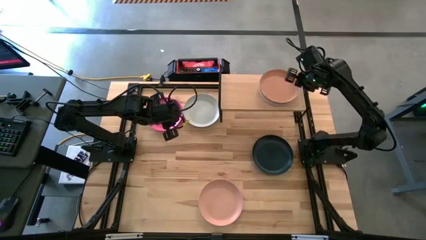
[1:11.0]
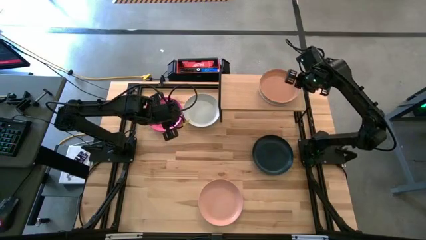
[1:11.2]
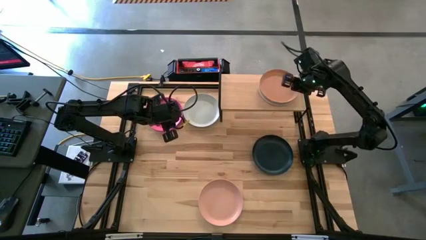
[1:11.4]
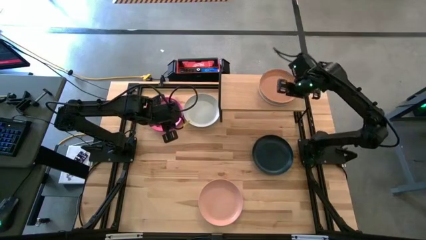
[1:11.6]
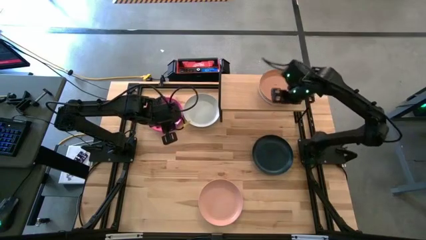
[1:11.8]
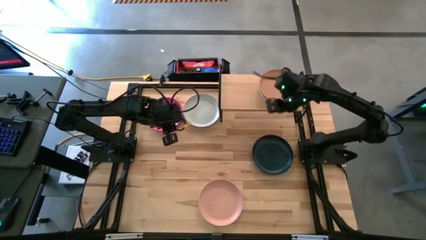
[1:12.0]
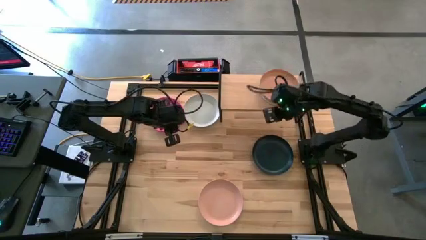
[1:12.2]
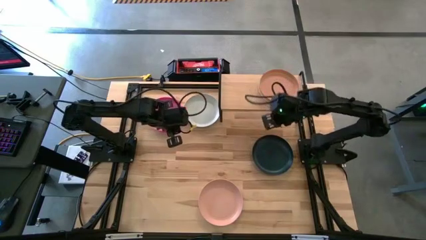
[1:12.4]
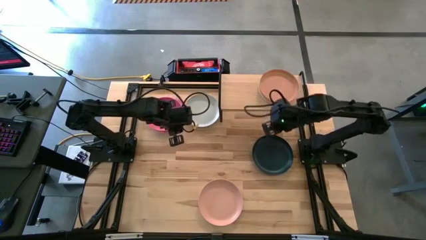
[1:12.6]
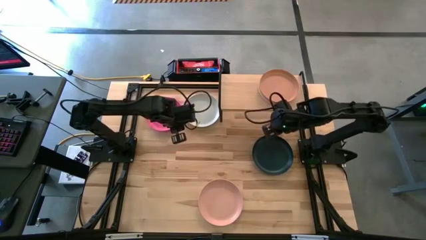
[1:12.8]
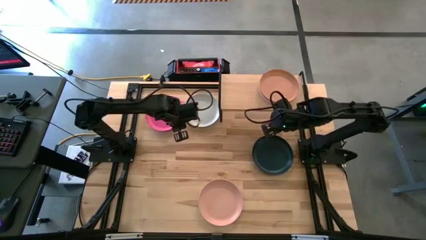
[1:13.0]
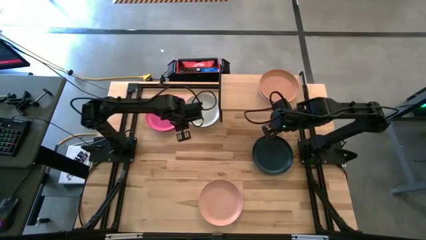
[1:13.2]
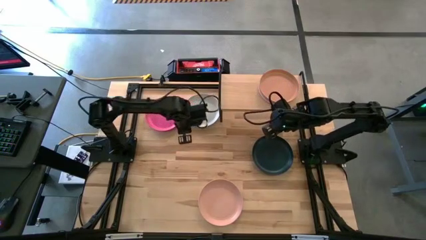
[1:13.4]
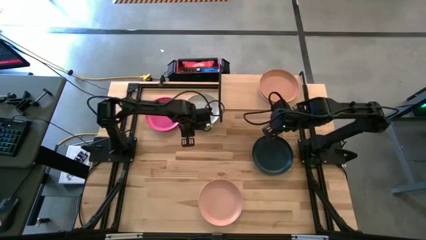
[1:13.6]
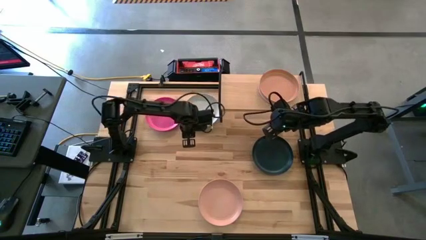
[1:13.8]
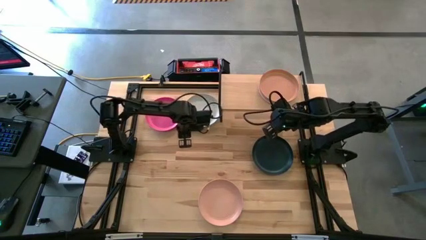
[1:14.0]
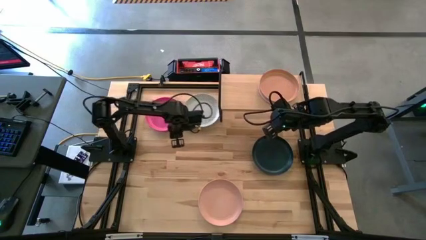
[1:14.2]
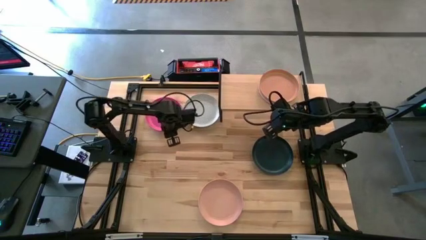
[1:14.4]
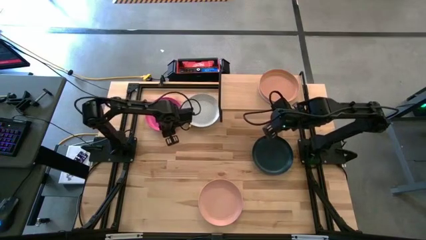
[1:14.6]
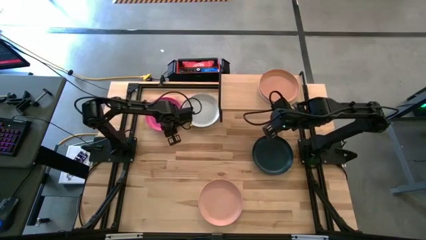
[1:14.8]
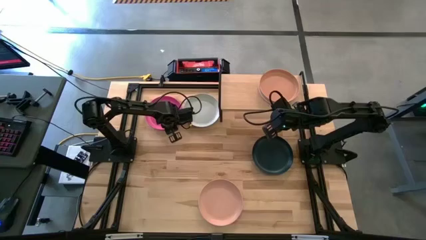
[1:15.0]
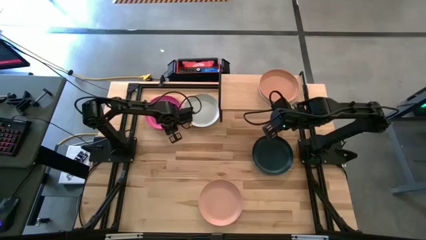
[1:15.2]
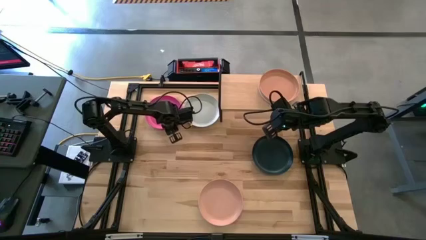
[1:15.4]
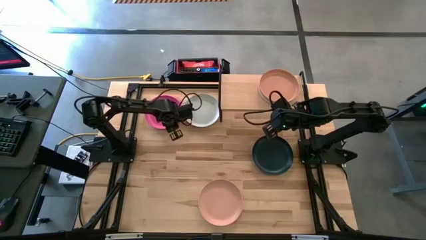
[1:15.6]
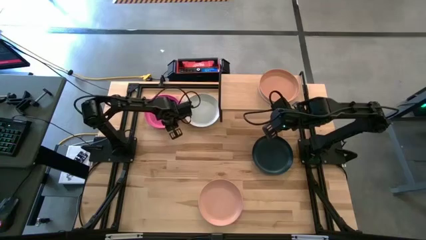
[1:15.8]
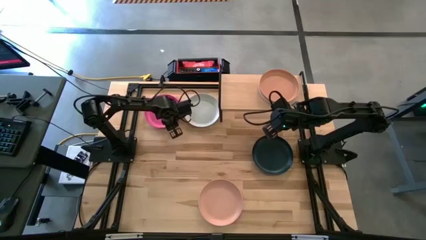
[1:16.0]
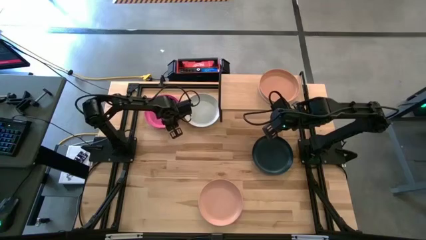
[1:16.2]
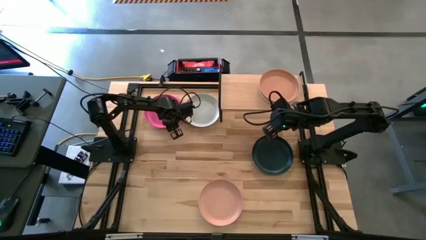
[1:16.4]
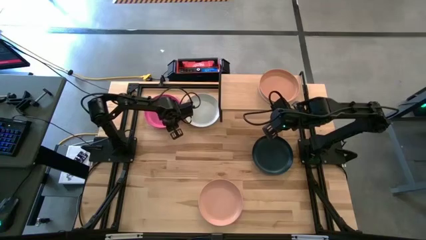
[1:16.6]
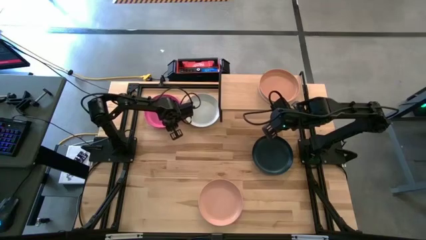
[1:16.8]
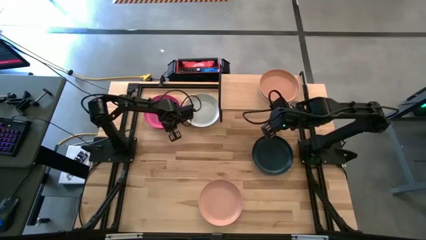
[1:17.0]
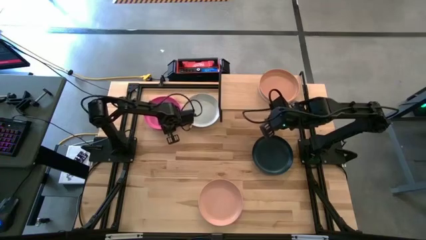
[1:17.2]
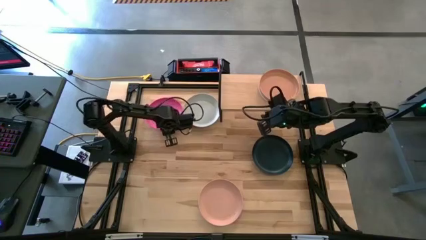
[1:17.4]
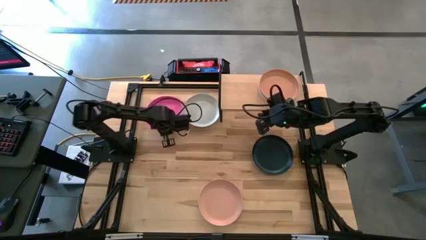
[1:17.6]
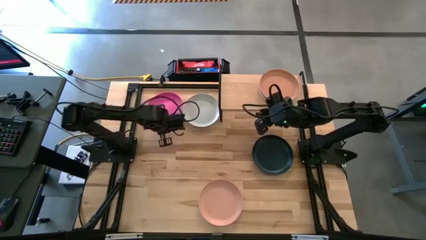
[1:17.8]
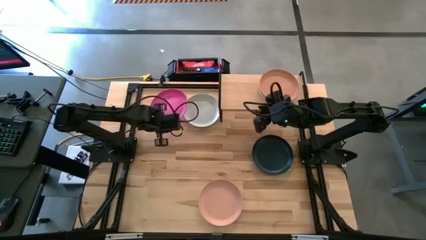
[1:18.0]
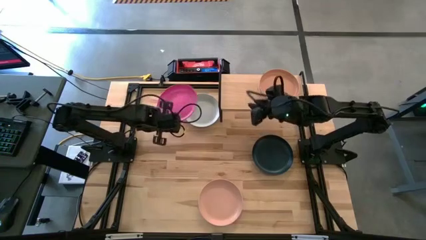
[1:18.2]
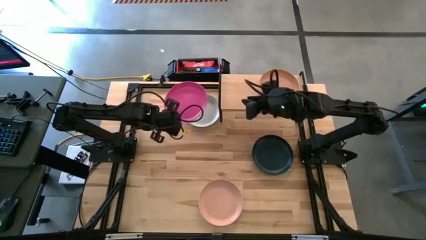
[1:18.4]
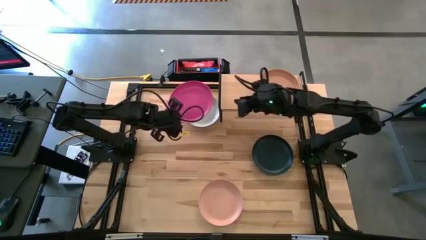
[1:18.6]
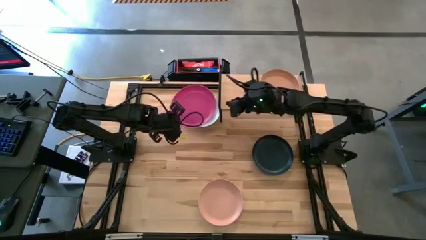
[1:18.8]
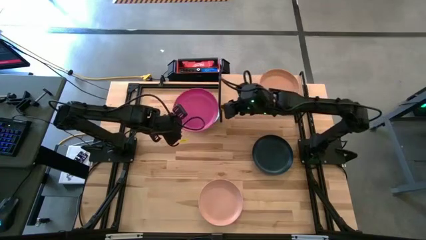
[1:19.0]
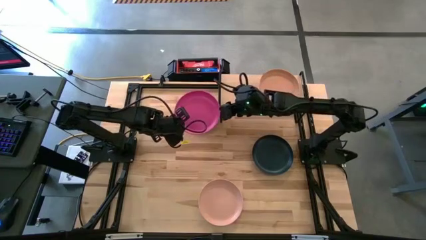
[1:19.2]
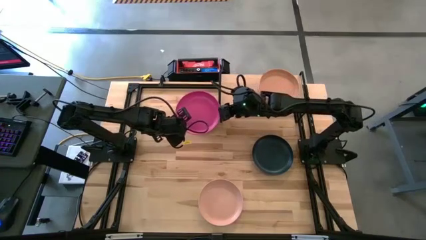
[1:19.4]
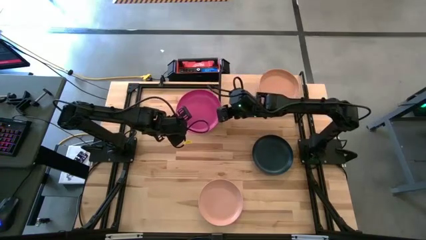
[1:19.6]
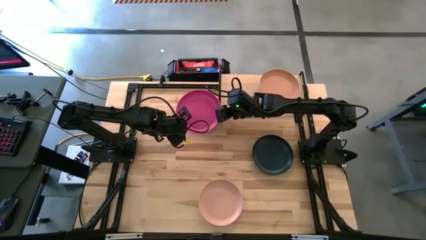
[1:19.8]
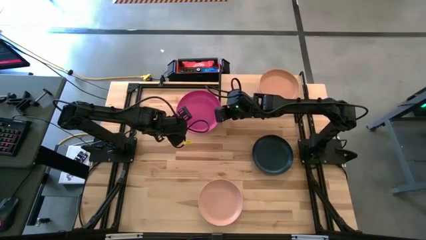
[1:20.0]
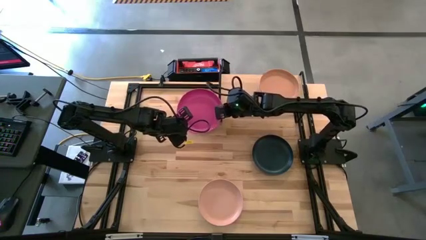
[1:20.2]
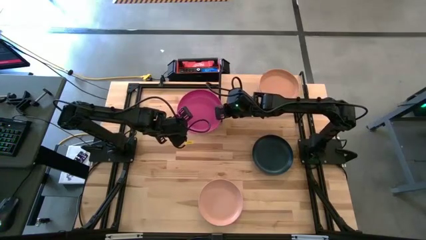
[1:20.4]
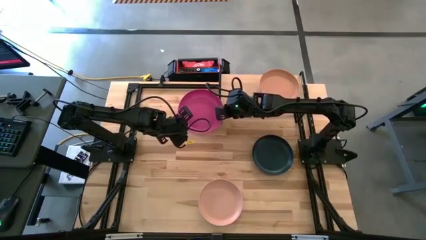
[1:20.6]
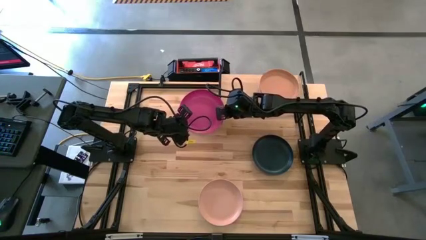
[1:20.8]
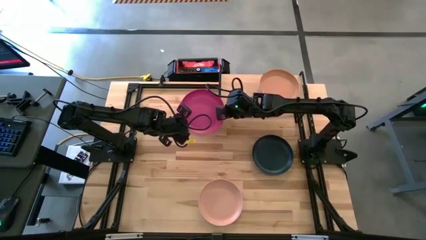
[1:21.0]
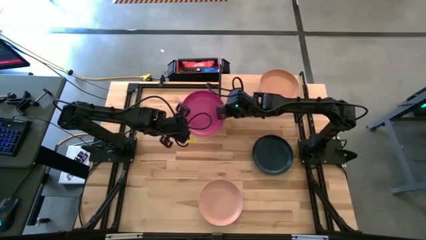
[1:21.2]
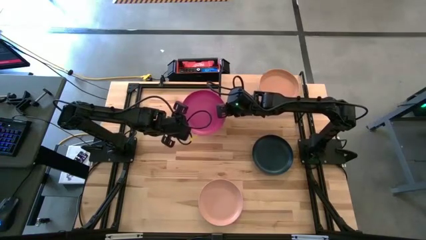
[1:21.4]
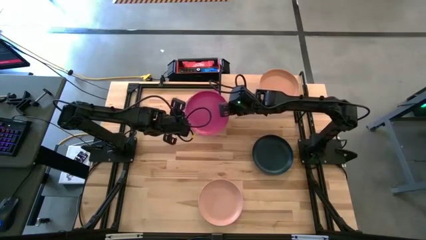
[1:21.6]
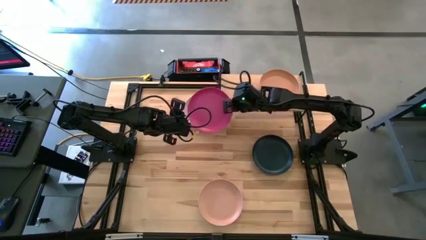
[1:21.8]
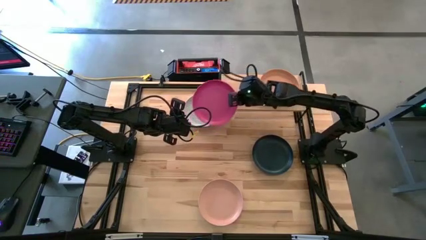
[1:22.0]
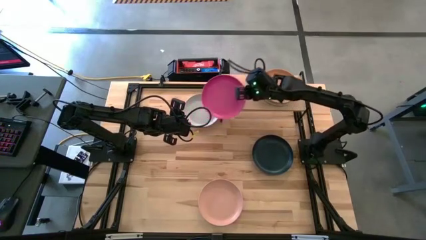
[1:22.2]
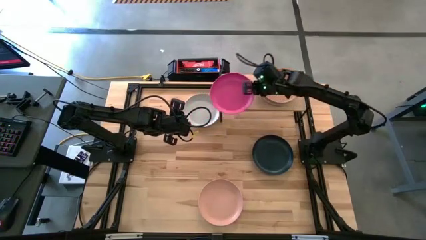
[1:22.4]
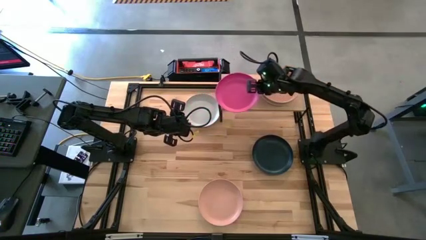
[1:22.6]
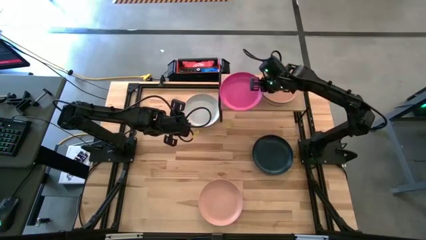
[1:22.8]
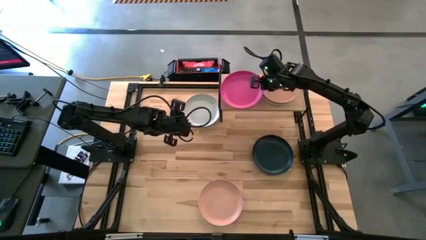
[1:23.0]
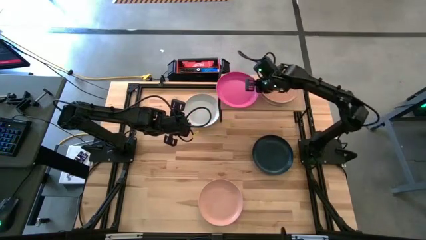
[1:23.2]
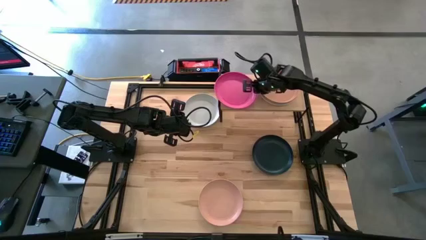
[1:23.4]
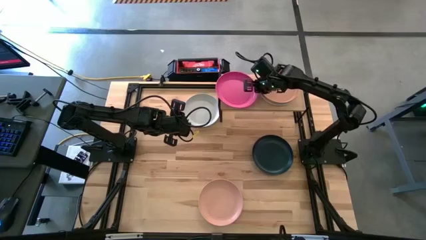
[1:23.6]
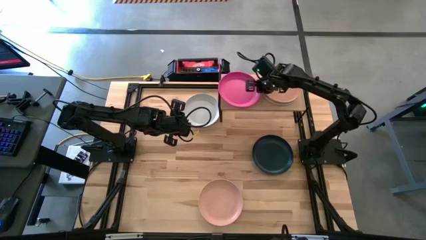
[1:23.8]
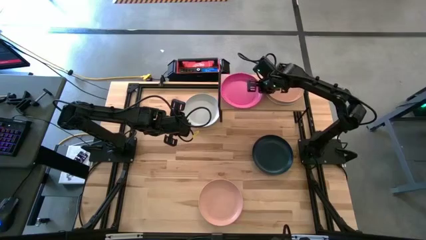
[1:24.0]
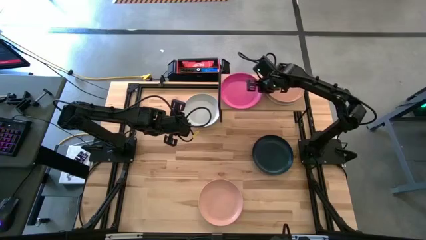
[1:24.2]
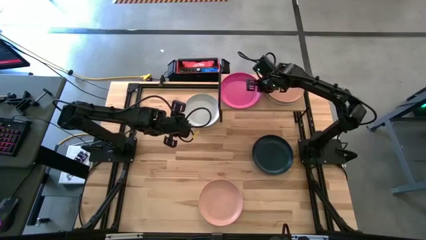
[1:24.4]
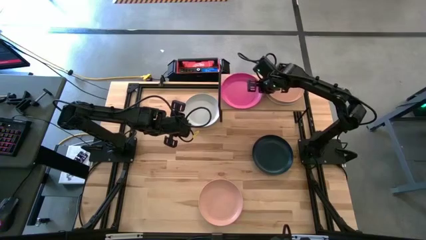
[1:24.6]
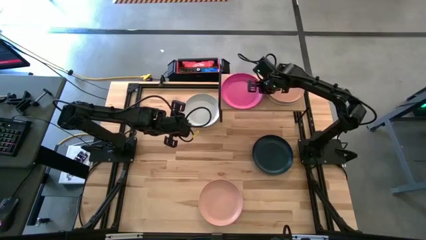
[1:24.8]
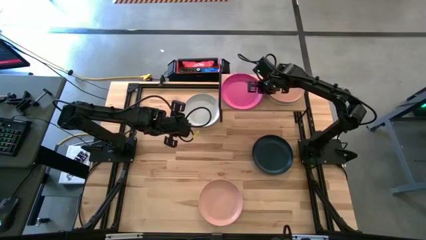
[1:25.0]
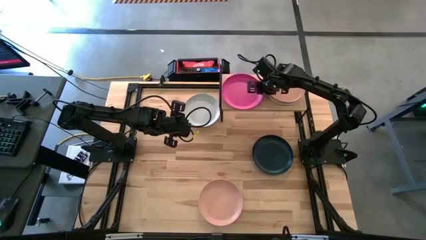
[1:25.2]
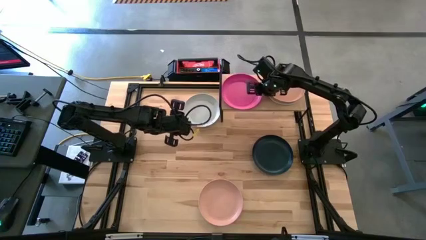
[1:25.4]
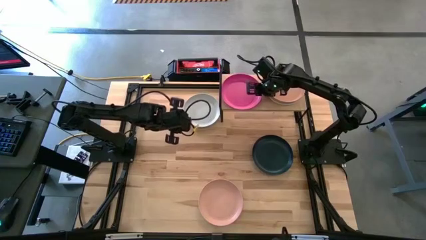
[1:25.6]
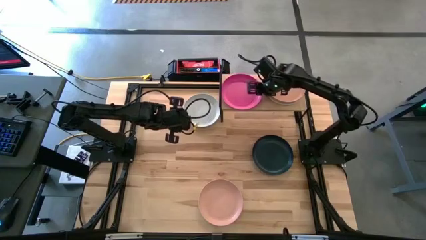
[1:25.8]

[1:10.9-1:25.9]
Task: Place and stack plates onto a shelf
Put the pink plate on the shelf
